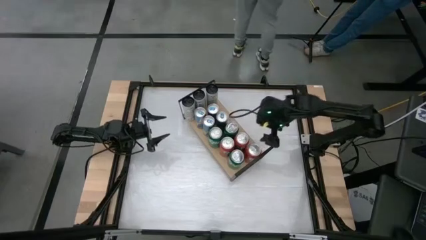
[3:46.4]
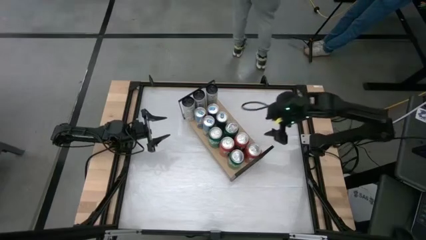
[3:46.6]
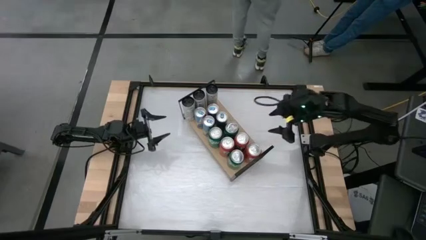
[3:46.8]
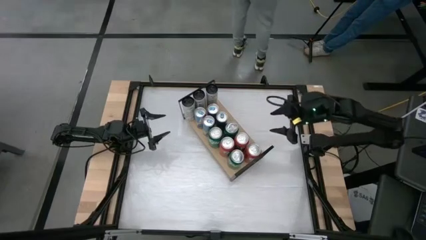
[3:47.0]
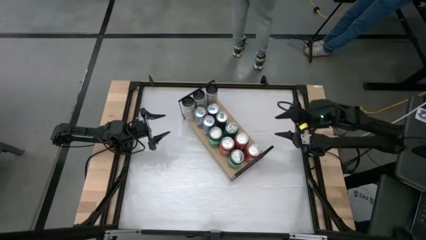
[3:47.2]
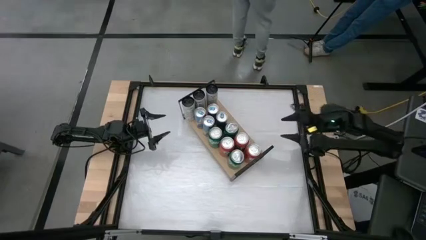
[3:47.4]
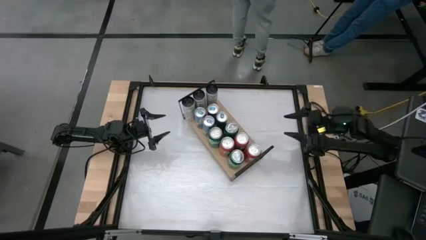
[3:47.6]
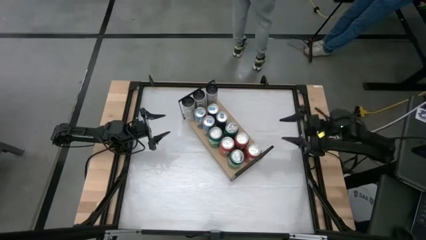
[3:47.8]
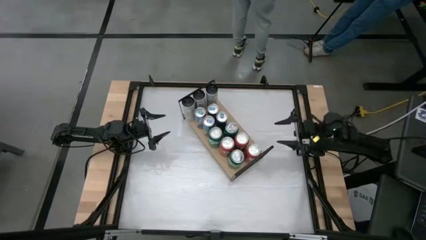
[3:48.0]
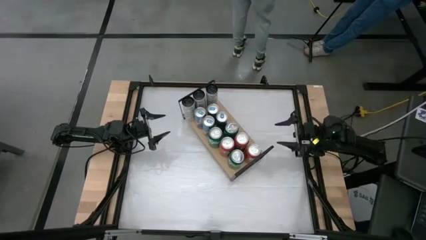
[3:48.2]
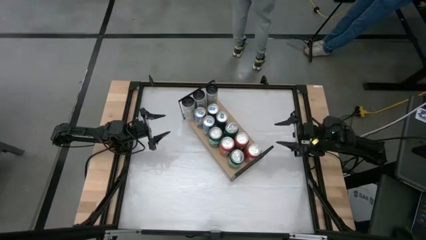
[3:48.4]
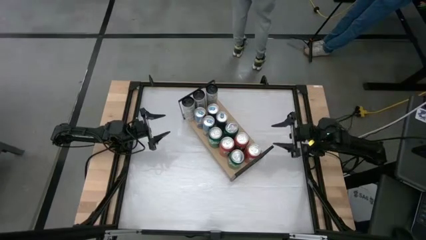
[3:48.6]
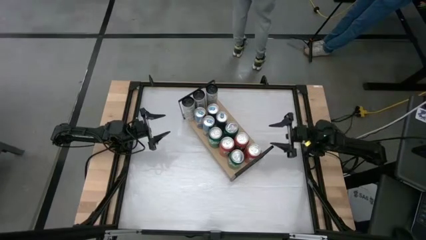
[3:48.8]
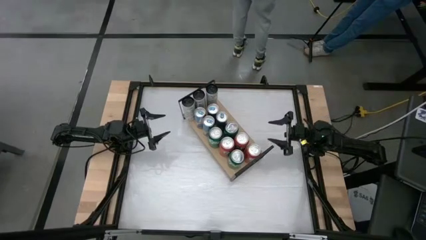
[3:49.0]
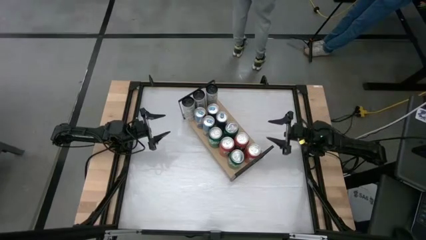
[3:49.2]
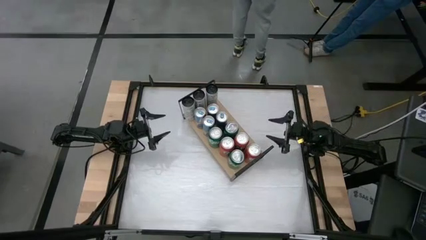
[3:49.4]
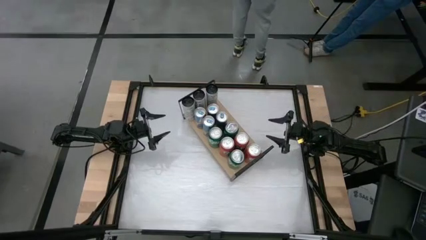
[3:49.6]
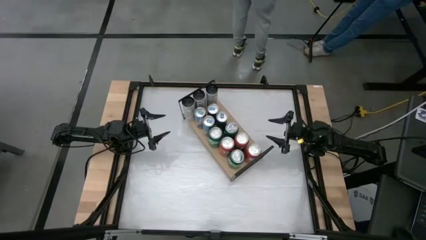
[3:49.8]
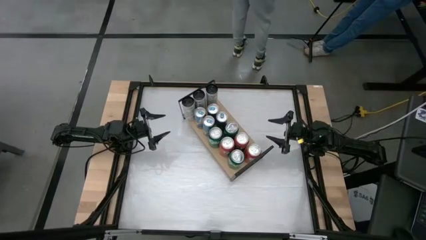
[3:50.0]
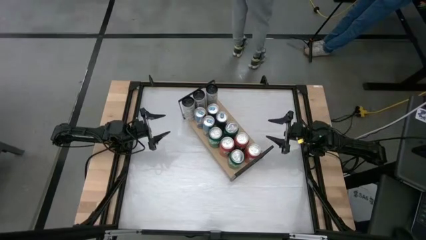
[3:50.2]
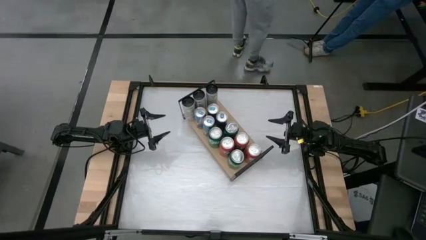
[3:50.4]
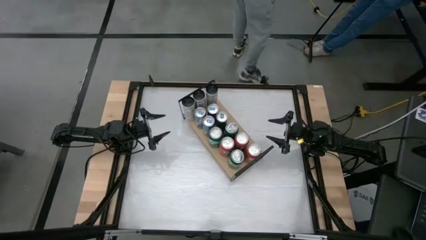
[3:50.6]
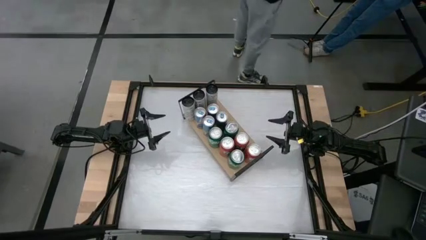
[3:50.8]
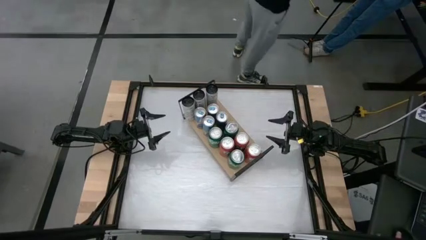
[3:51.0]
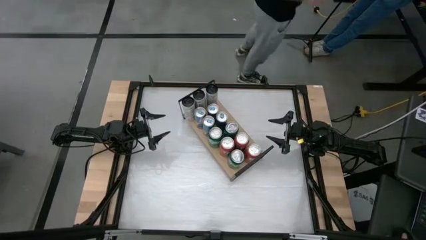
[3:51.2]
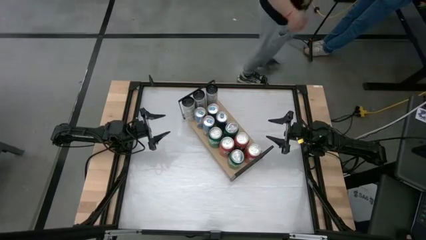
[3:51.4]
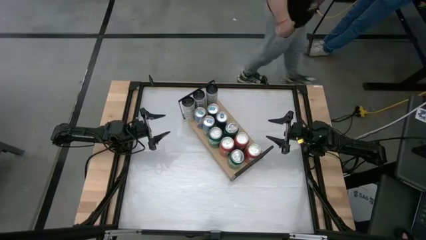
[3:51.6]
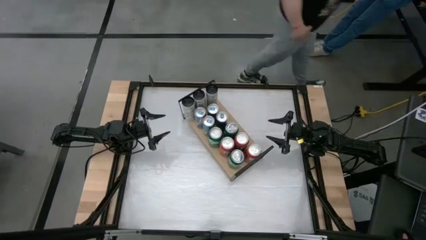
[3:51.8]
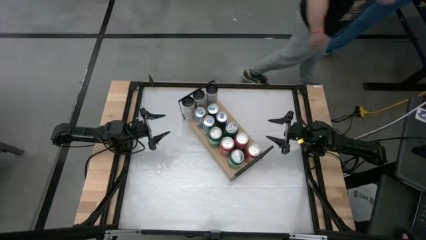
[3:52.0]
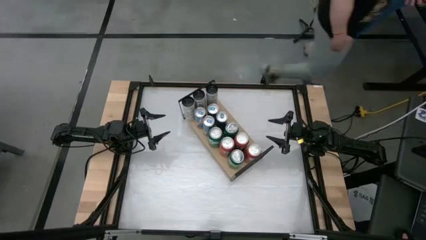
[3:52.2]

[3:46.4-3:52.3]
Task: Place canned beverage on shelf
Return to Home Position

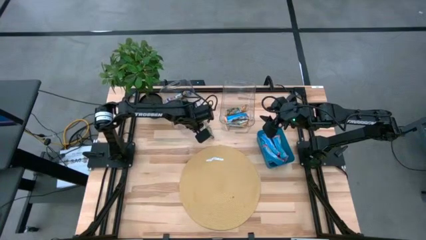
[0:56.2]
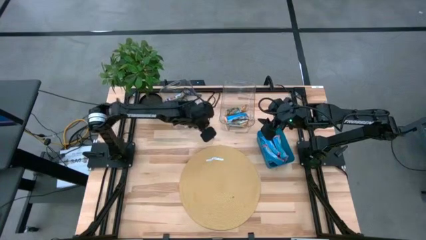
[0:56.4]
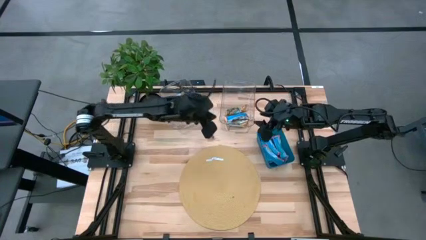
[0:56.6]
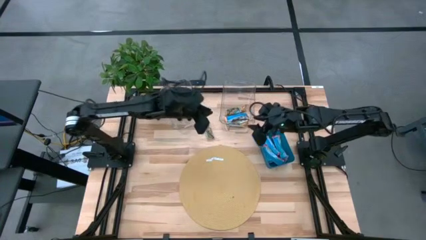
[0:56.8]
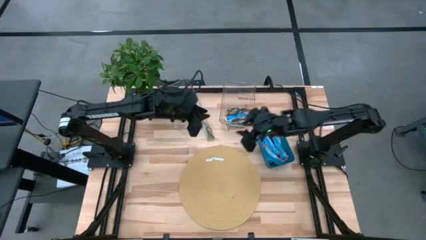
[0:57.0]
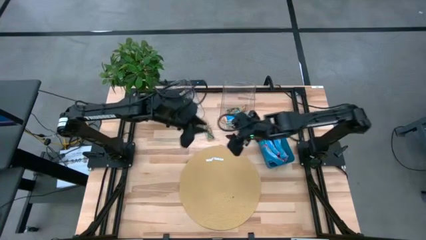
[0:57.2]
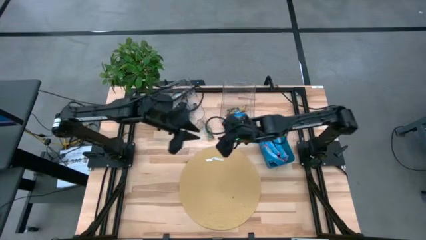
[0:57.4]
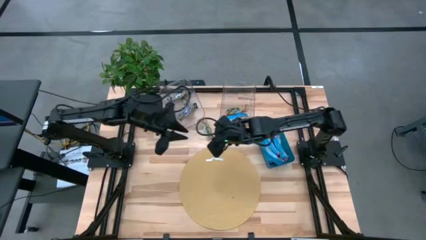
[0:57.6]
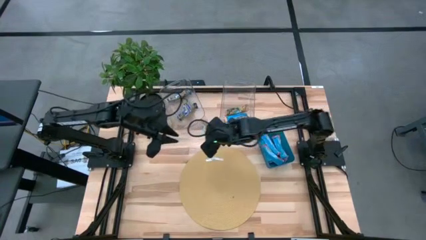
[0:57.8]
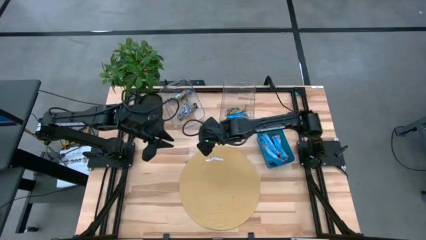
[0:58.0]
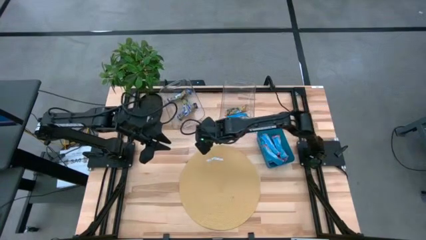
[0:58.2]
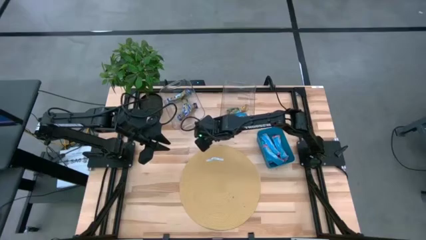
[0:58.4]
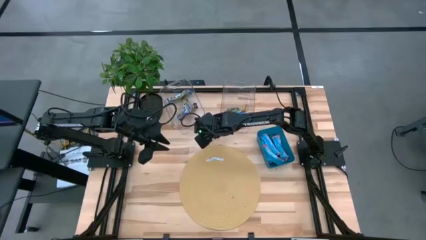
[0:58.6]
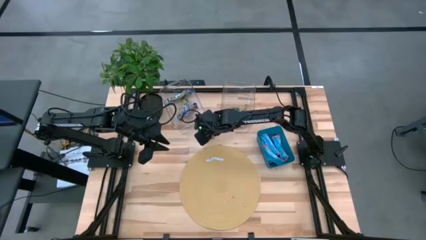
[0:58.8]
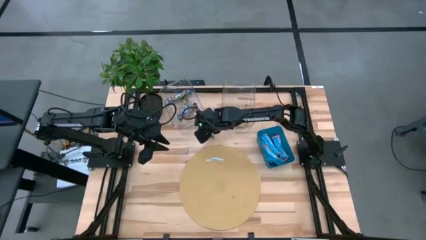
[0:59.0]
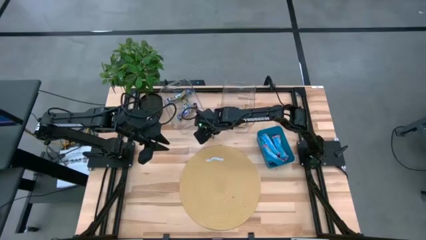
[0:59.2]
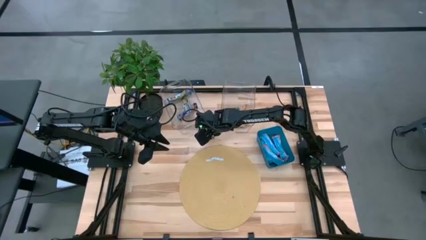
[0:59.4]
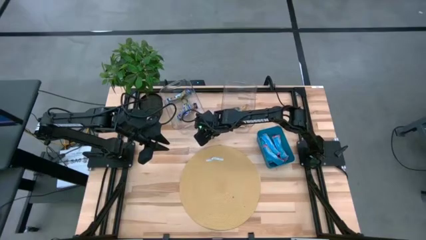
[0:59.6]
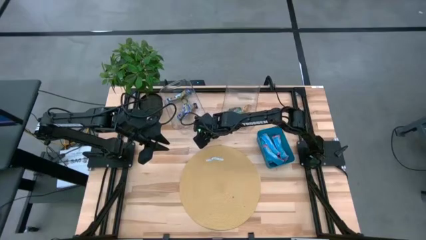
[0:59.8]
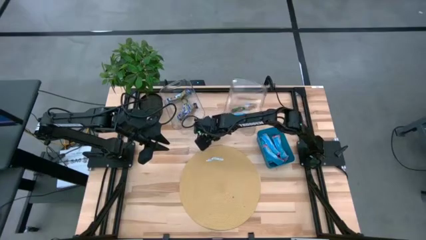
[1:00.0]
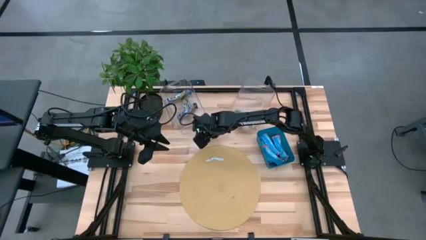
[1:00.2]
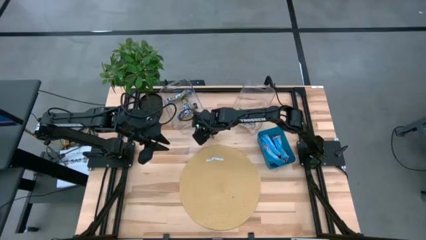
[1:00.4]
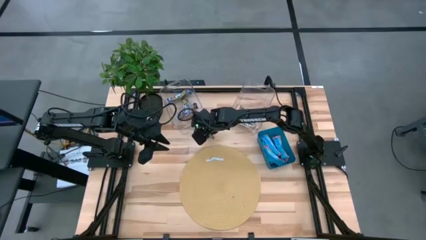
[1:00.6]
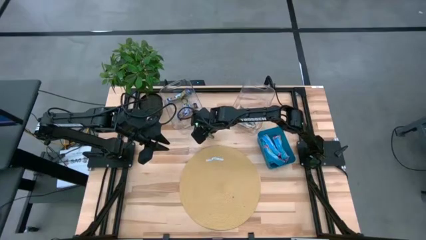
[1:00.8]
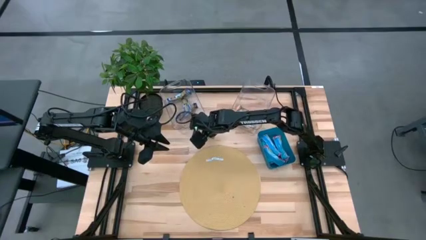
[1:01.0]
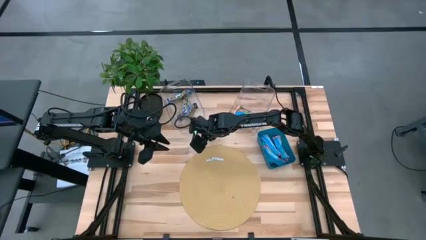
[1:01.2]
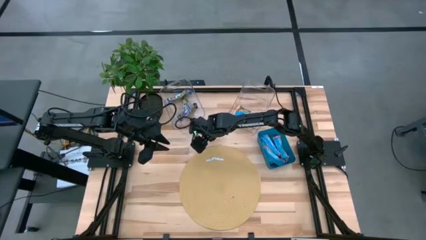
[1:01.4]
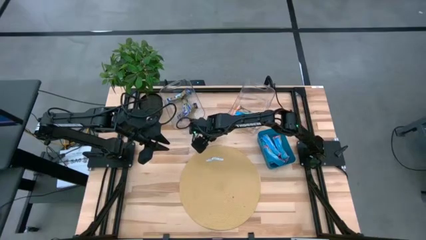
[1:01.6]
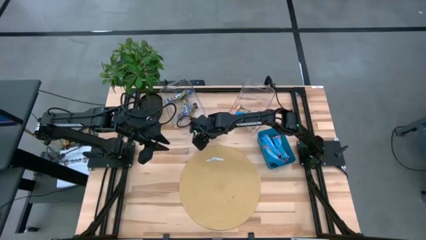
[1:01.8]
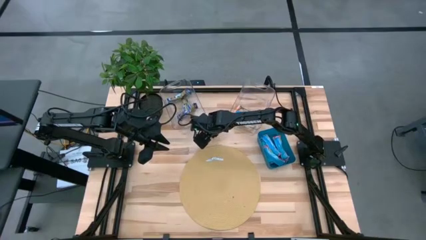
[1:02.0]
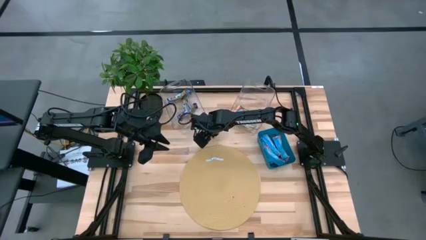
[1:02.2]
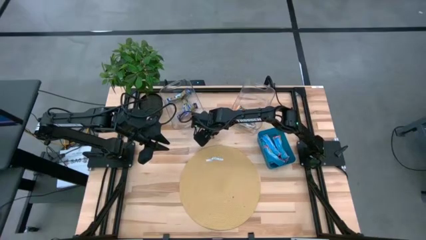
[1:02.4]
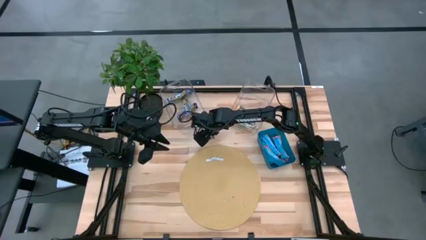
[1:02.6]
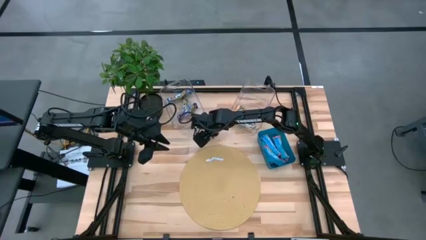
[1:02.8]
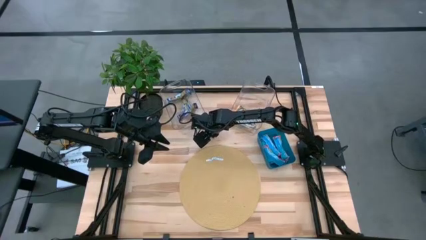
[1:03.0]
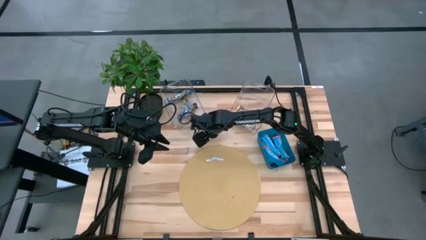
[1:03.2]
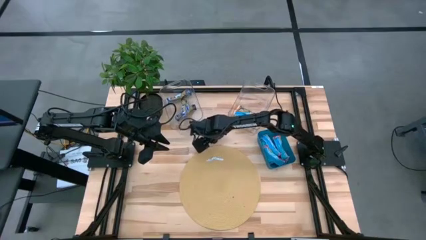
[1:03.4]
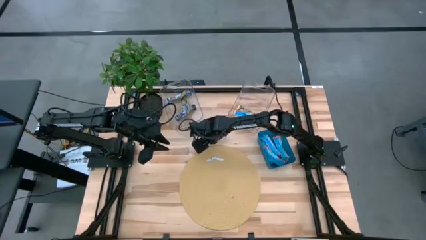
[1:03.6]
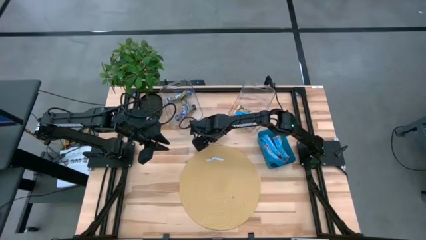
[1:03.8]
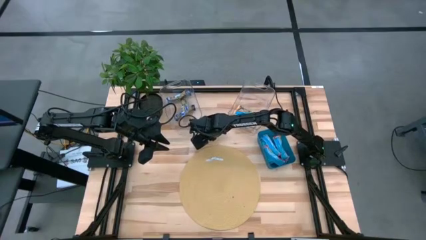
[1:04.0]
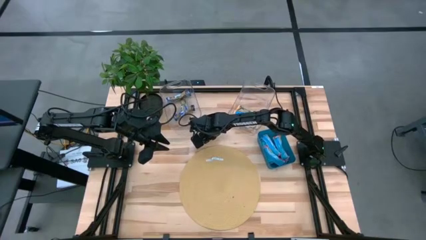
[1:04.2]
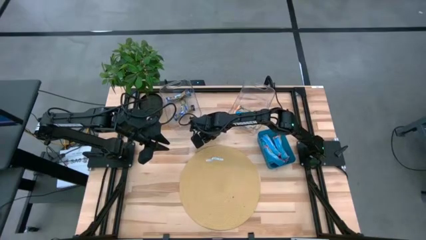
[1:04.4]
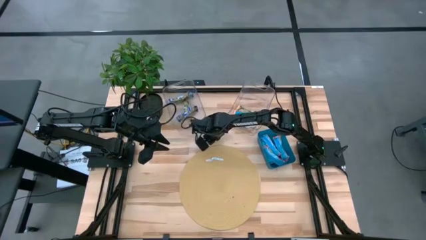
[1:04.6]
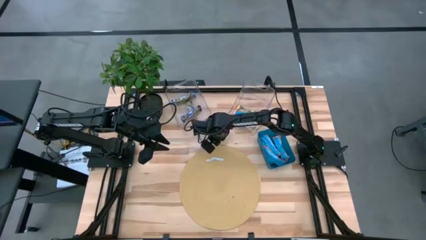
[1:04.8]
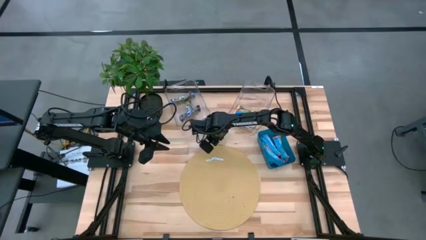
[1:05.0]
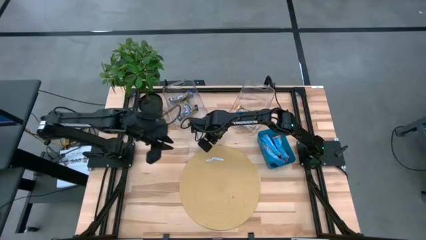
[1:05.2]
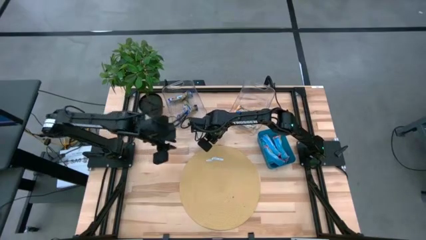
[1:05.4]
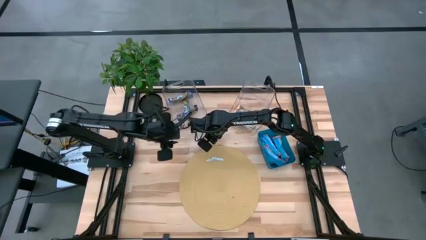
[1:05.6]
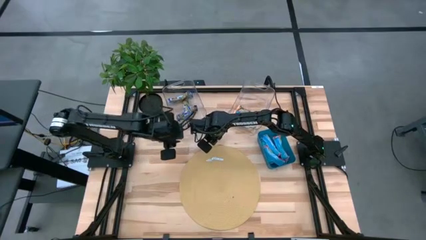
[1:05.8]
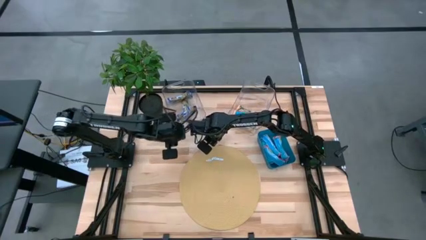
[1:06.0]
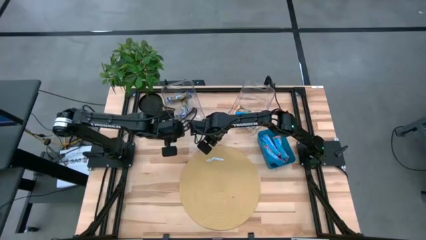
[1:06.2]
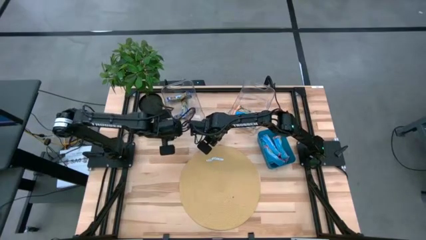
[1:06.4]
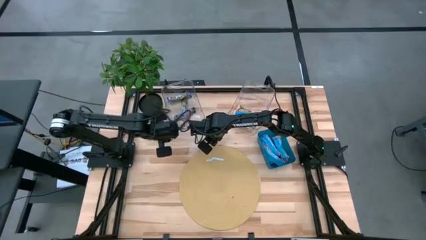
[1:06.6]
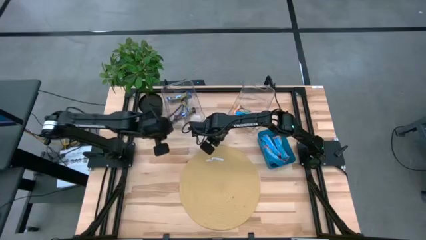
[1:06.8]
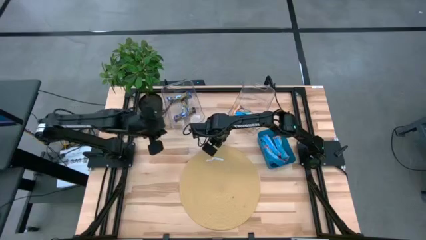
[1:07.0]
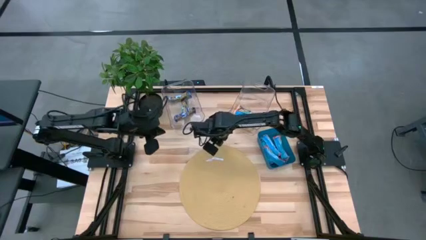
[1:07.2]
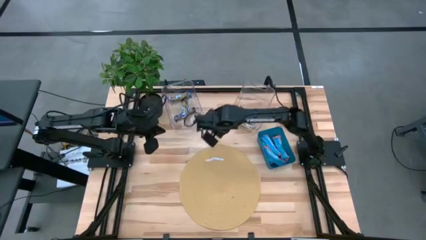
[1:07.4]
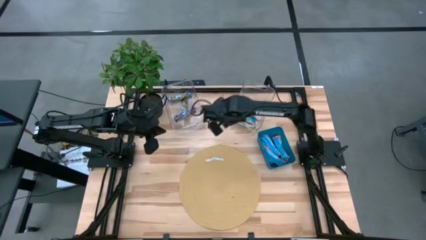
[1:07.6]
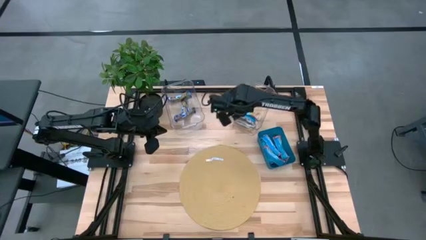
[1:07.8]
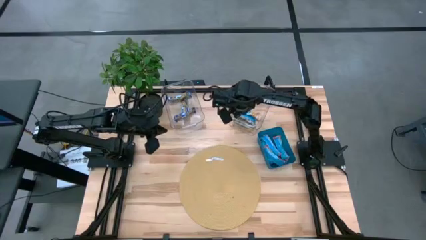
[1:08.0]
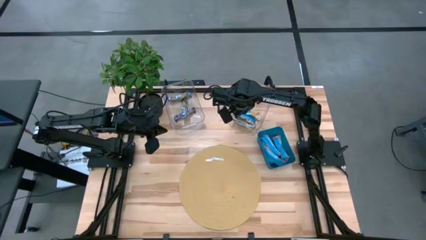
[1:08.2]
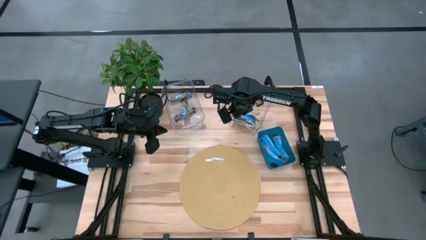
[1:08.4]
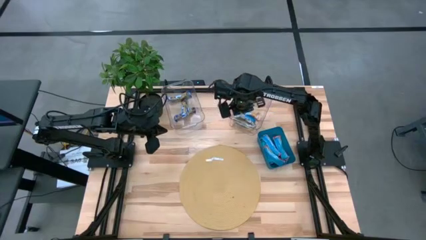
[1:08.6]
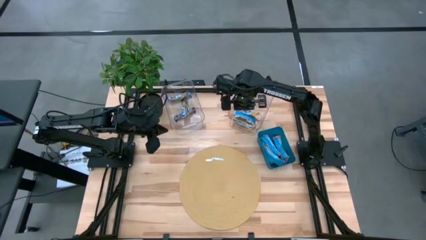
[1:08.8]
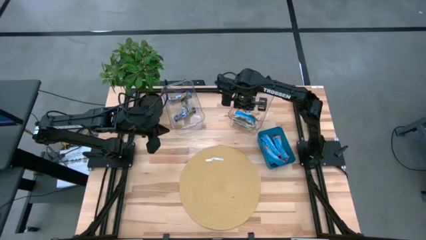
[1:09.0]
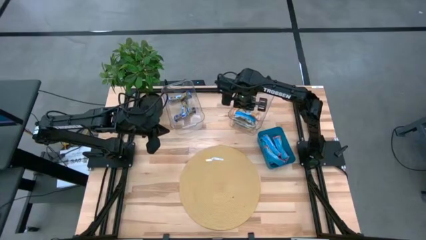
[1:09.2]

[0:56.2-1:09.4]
Task: Pick and place Granola Bars by type
Put the yellow granola bar into the right transparent bin
